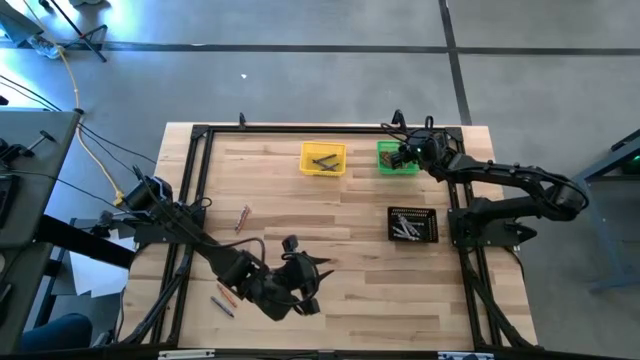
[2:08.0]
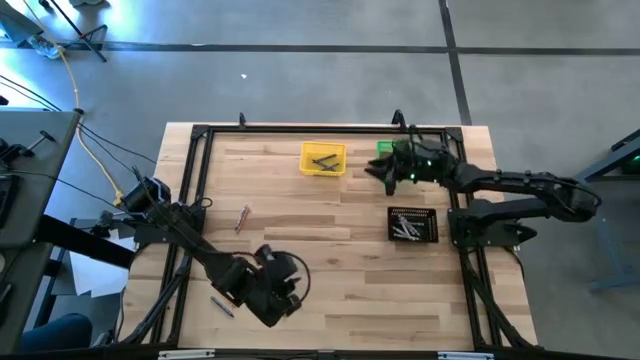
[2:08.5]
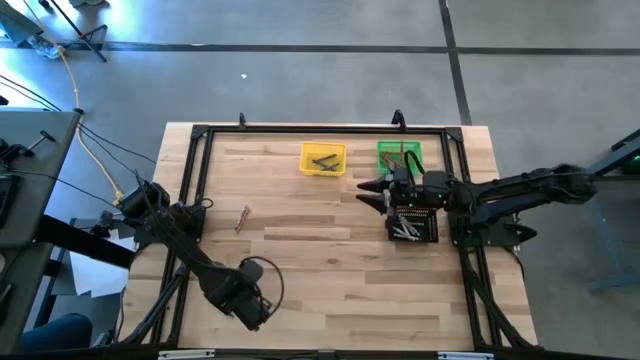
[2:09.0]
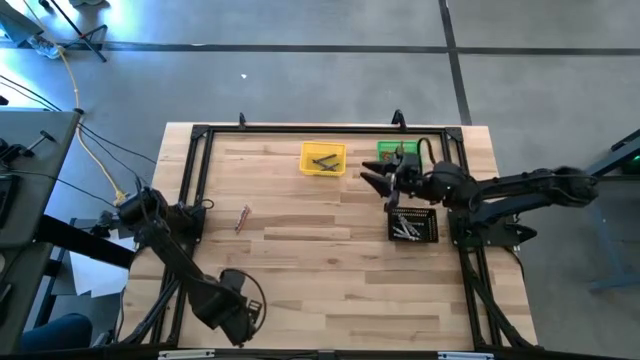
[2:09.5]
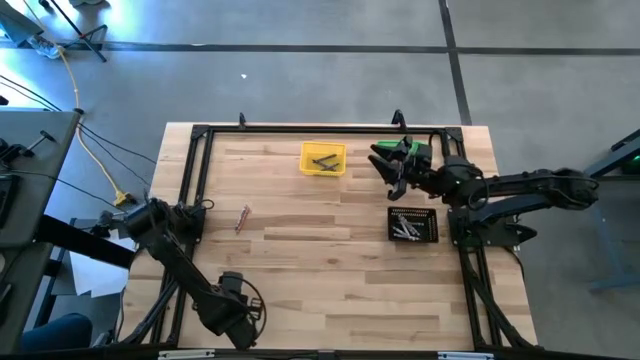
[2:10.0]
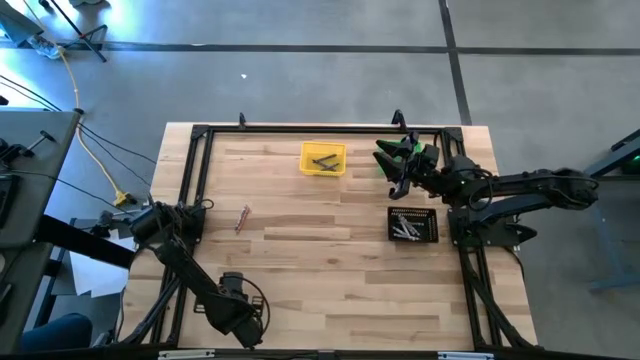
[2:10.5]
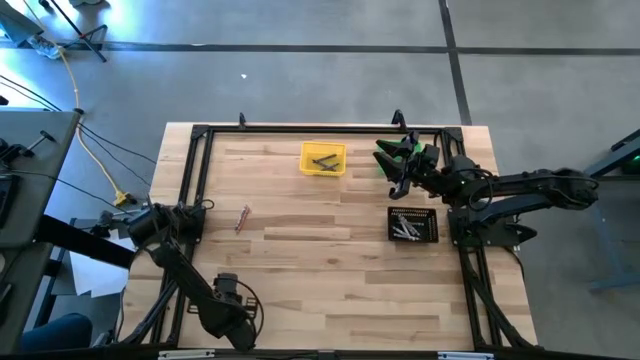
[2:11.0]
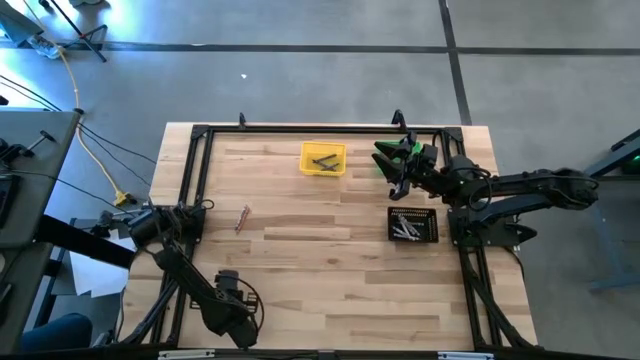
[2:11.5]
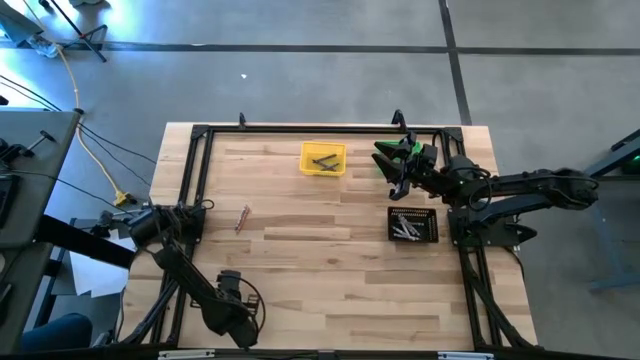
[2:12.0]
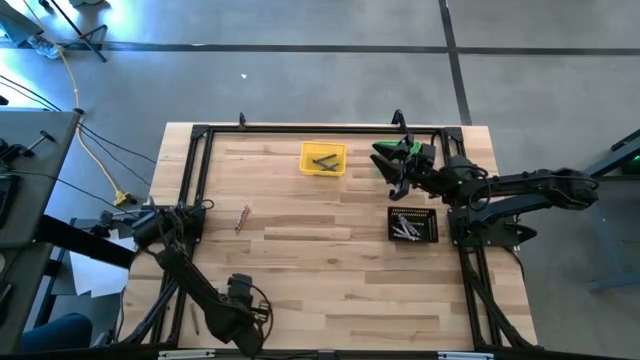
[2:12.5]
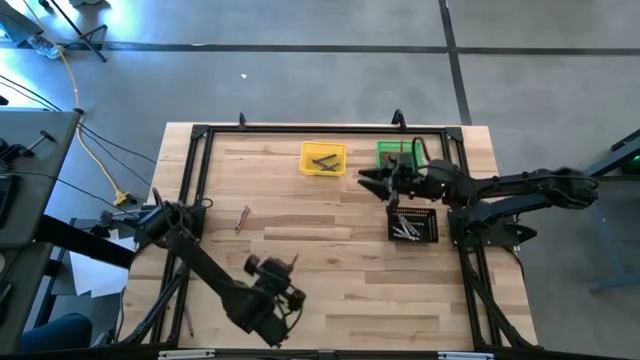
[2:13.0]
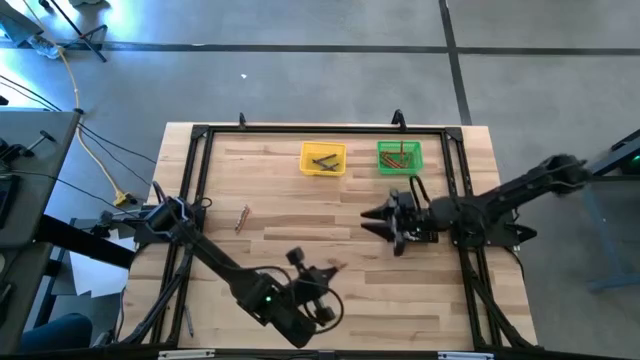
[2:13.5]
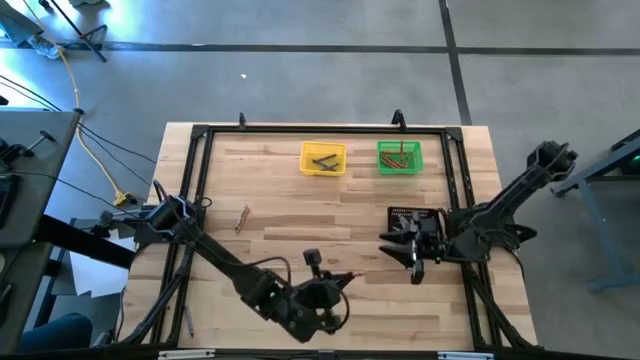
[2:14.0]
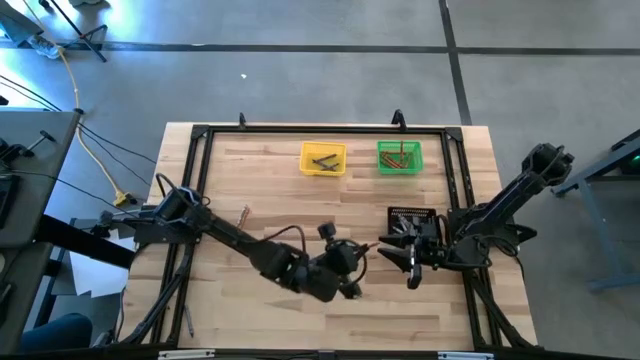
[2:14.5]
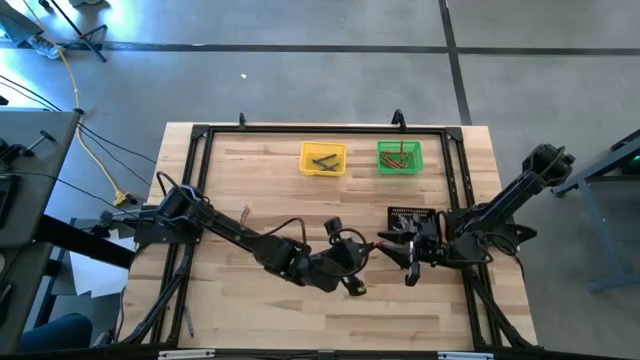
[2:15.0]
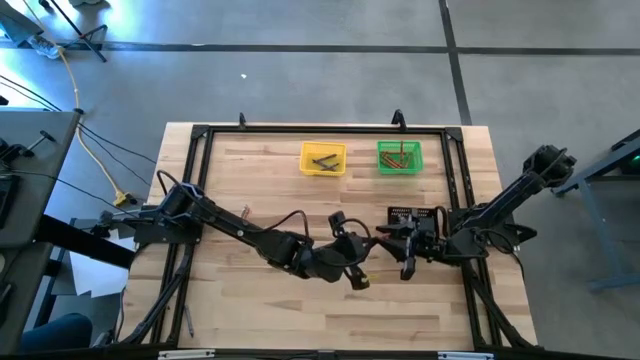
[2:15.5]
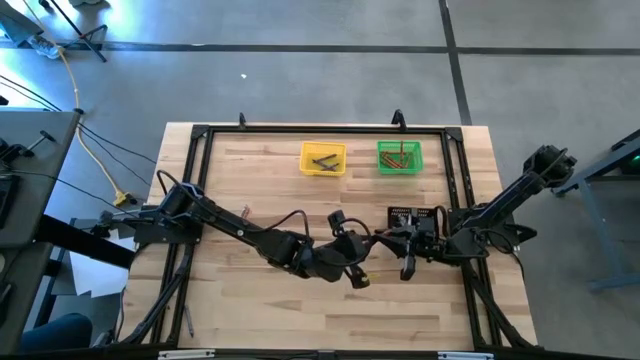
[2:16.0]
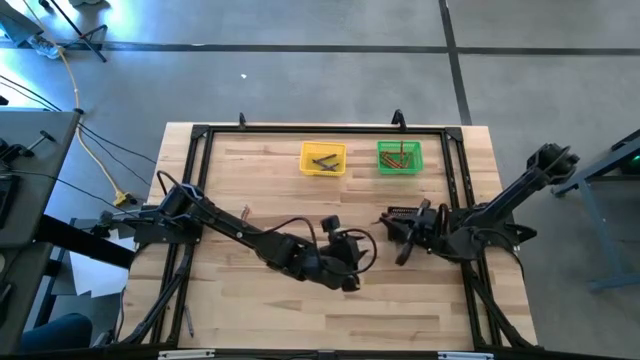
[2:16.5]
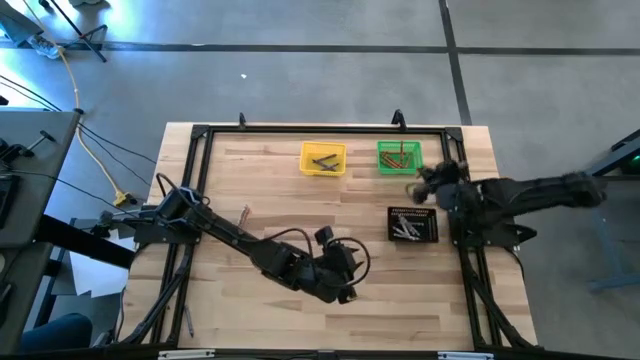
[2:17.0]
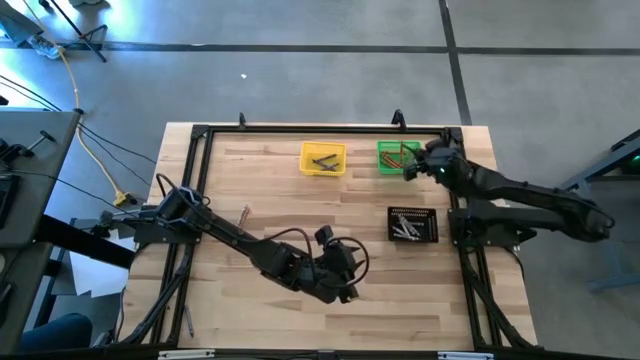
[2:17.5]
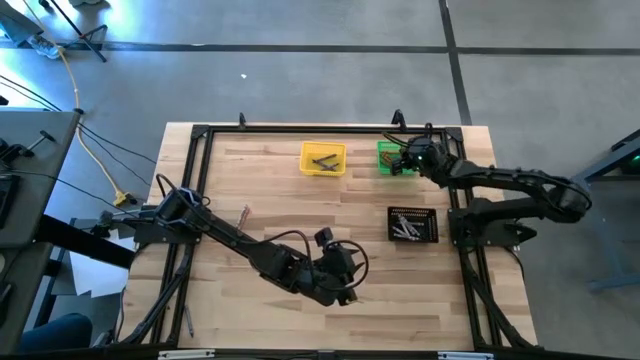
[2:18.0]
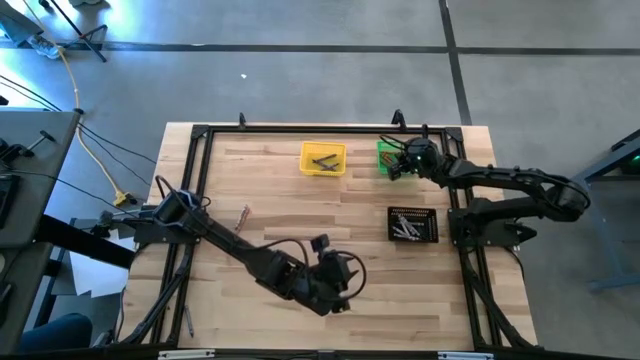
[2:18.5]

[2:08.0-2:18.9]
Task: Sort crayons
Put the orange crayon into the green bin

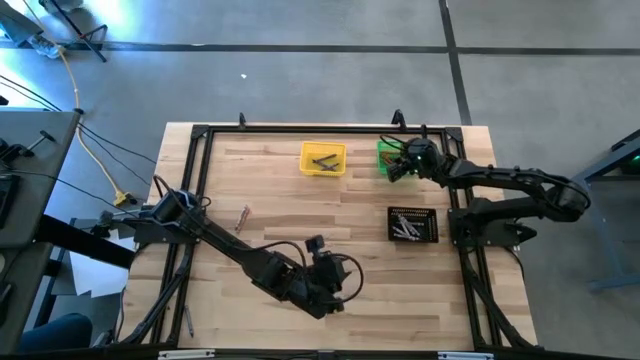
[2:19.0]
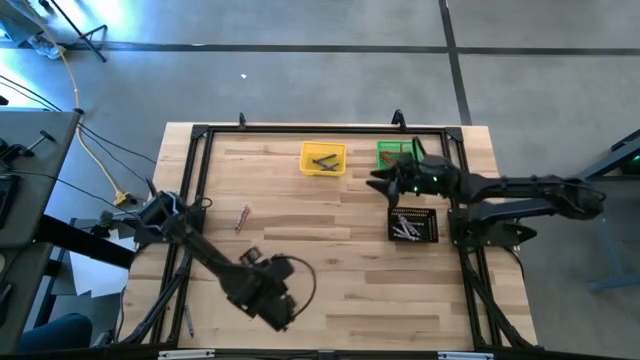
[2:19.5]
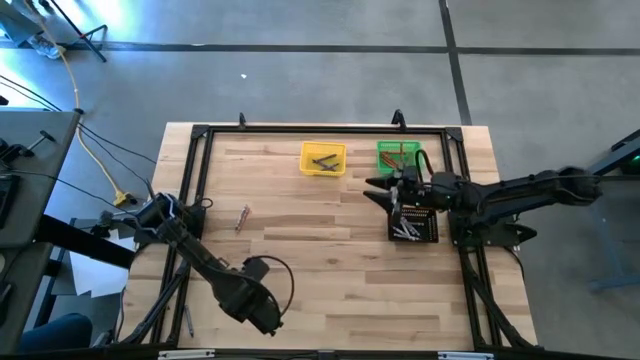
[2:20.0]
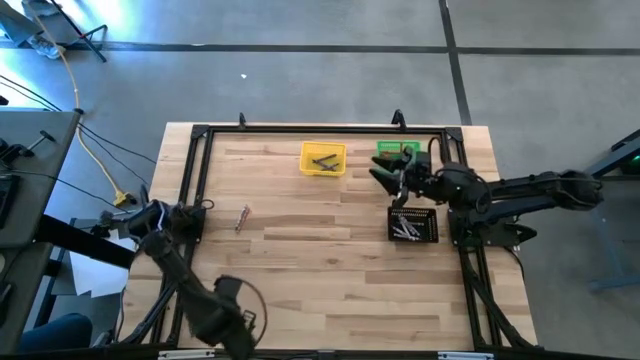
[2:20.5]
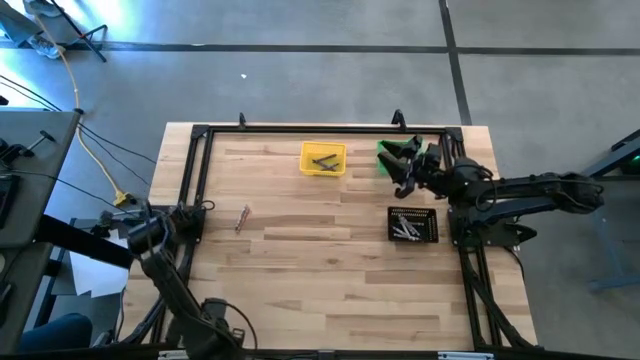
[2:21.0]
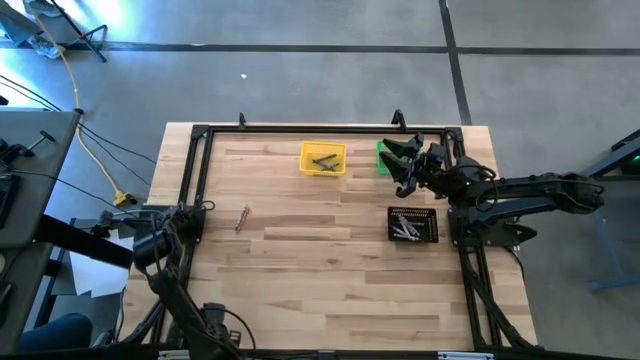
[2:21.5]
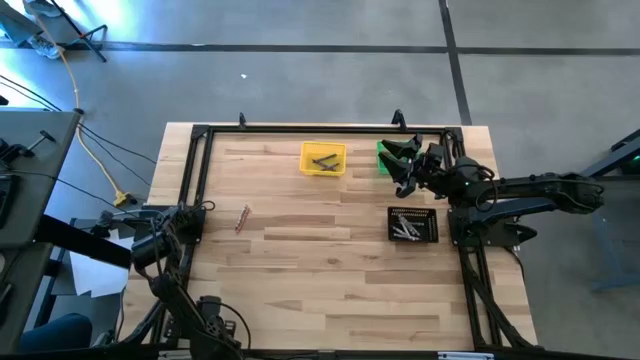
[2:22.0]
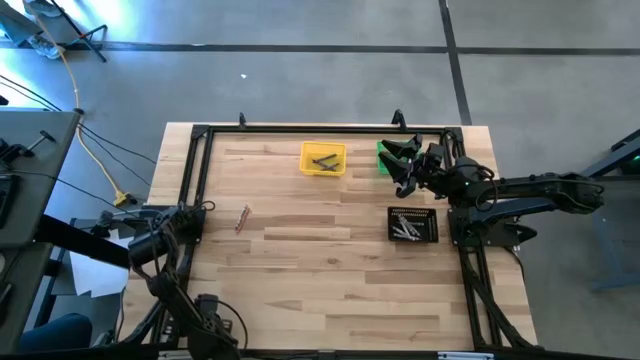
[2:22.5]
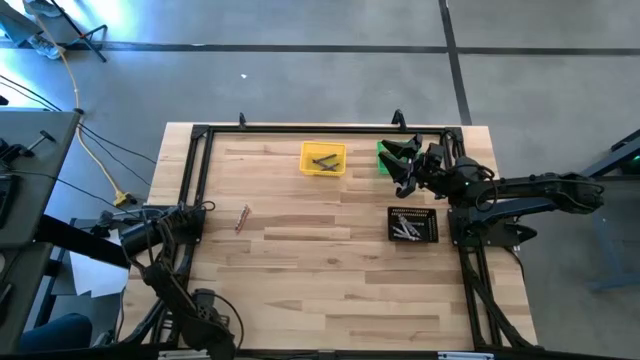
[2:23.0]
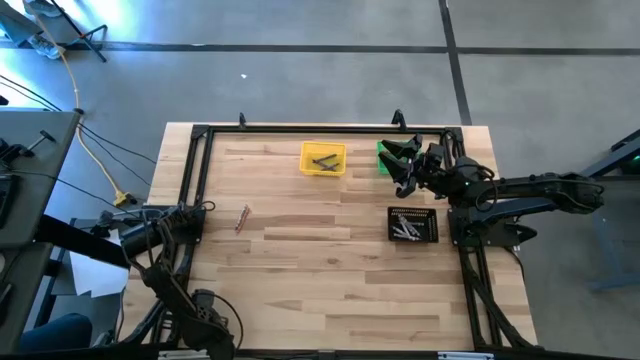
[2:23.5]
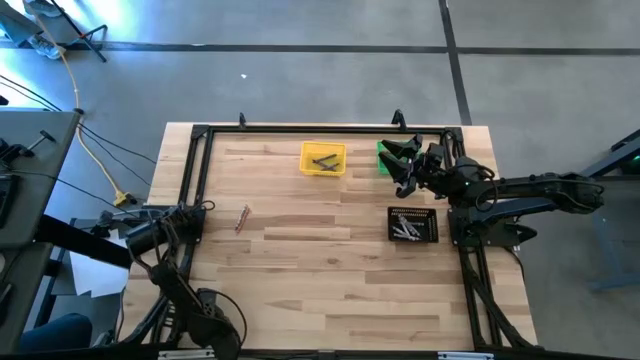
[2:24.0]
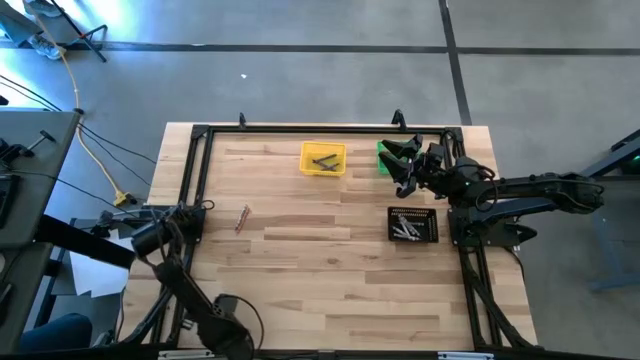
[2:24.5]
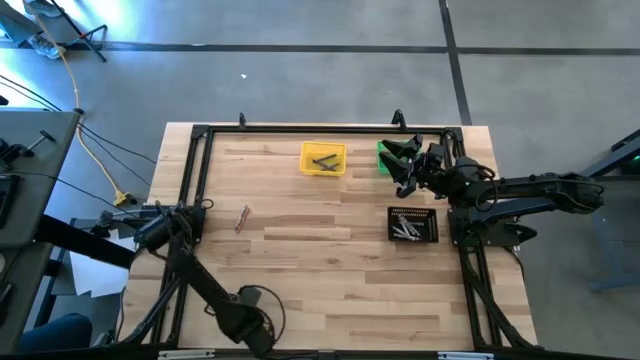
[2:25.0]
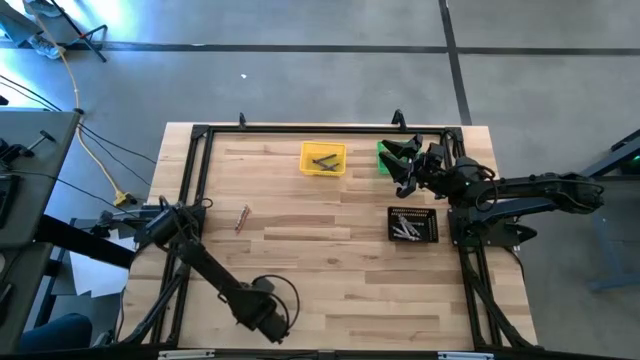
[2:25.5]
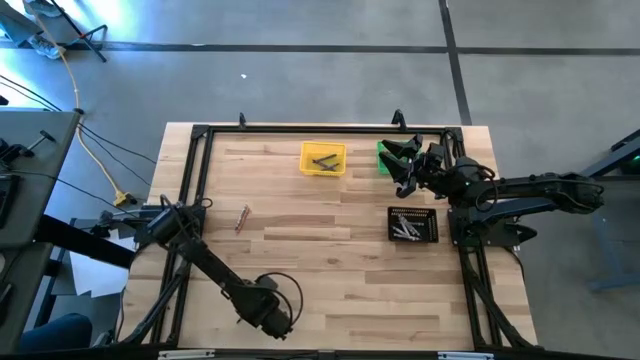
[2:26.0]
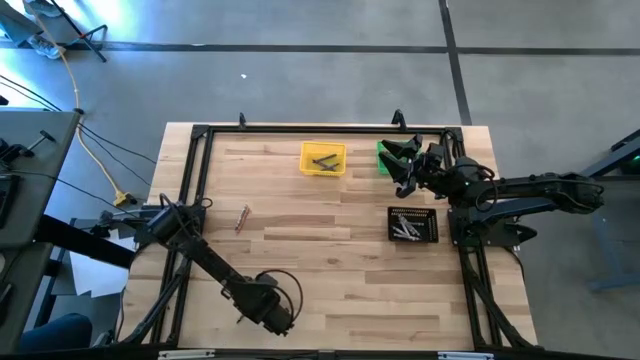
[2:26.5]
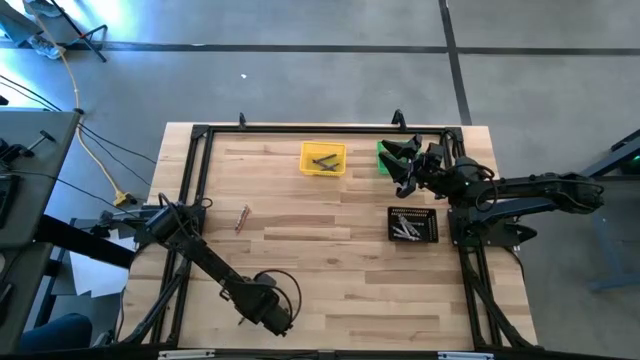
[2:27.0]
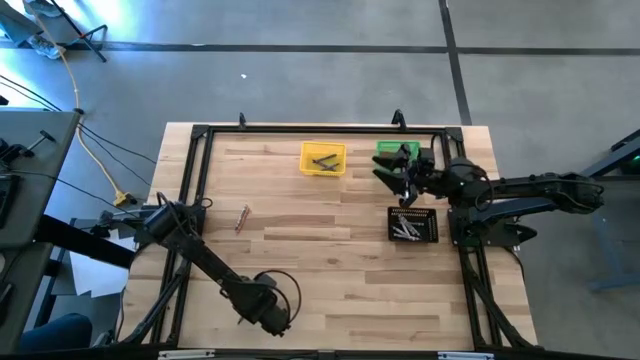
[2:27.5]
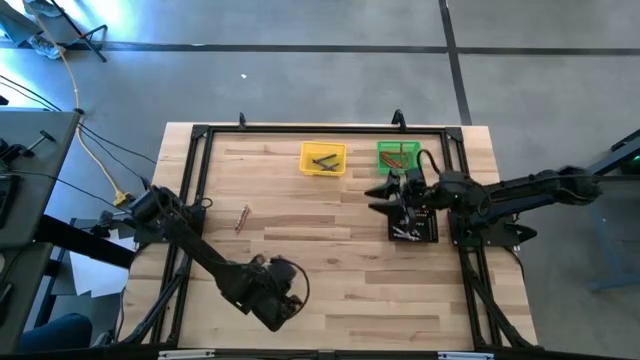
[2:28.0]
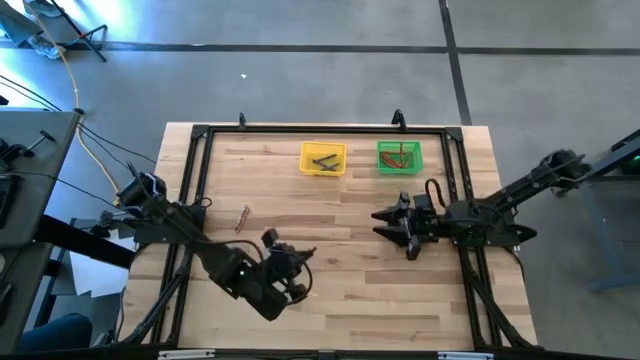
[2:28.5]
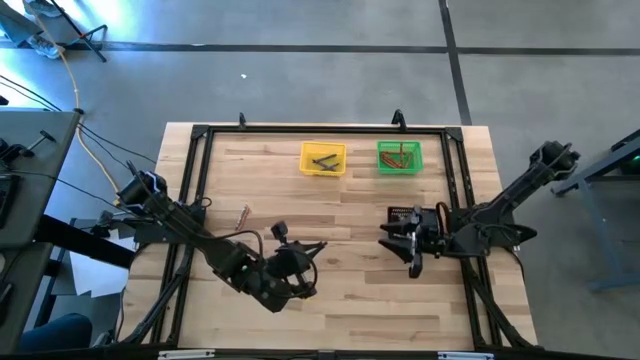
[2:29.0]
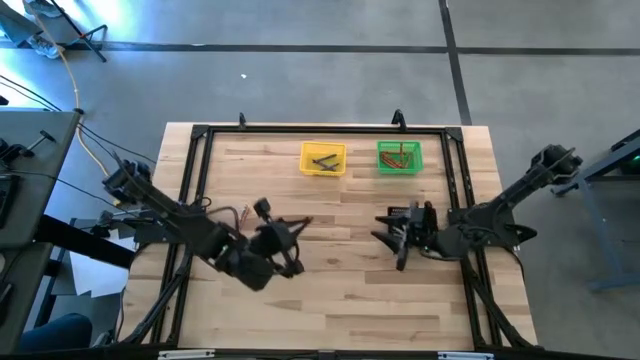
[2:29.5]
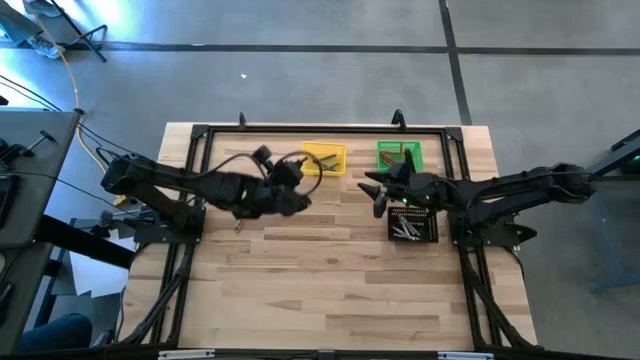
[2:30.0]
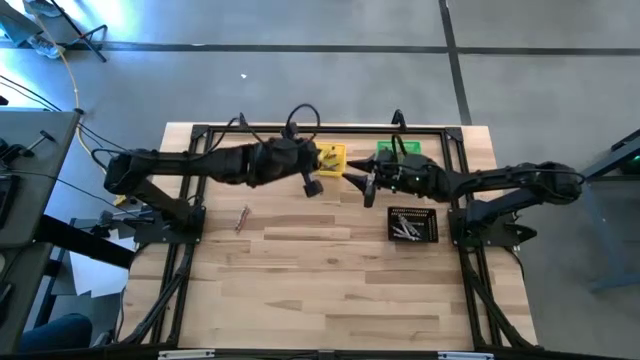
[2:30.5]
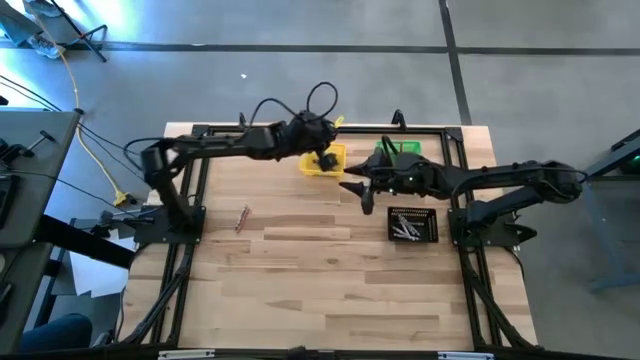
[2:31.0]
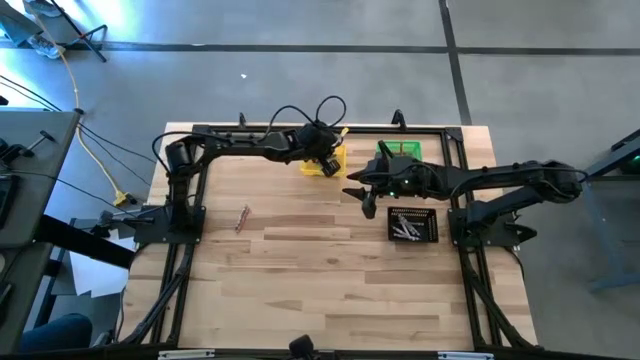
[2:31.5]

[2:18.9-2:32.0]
Put the blue crayon into the yellow bin
